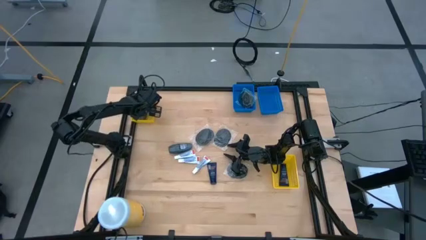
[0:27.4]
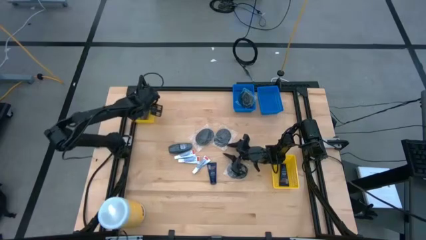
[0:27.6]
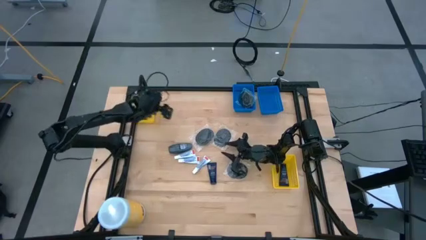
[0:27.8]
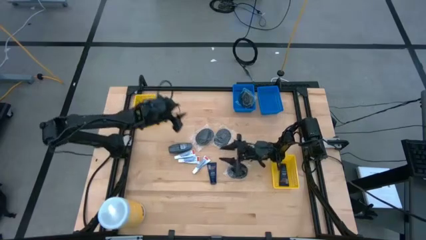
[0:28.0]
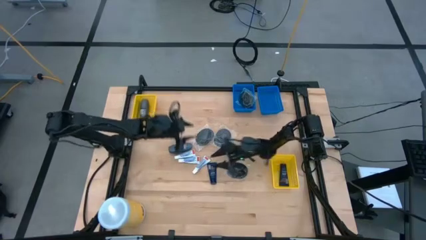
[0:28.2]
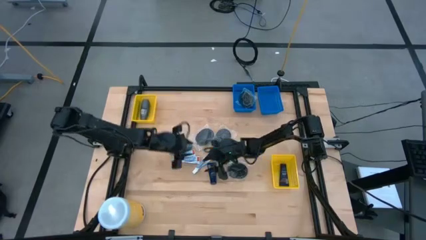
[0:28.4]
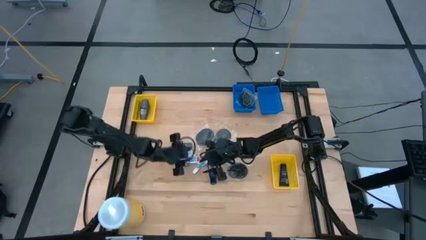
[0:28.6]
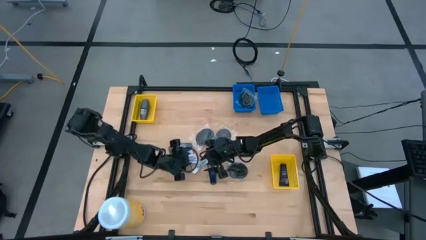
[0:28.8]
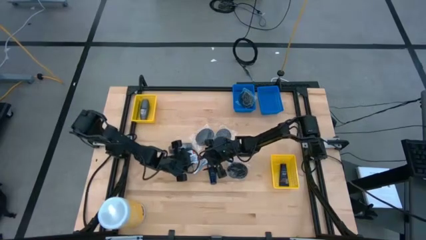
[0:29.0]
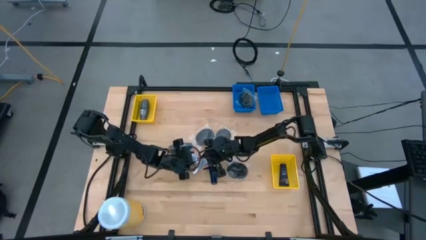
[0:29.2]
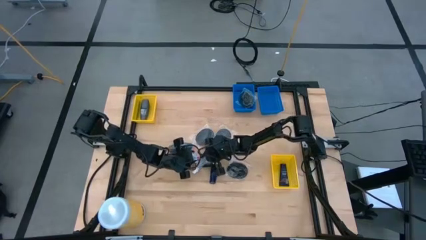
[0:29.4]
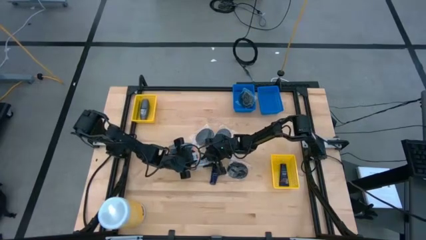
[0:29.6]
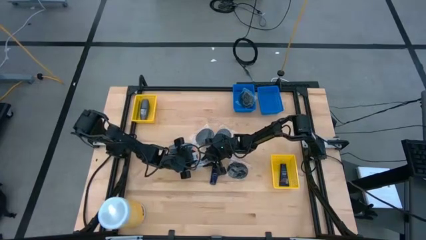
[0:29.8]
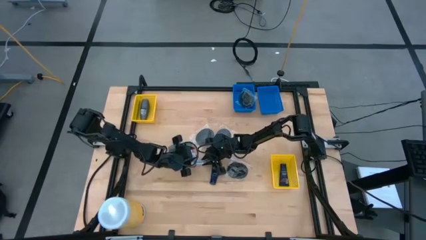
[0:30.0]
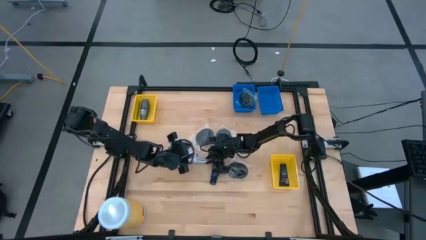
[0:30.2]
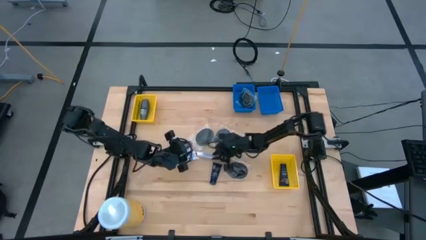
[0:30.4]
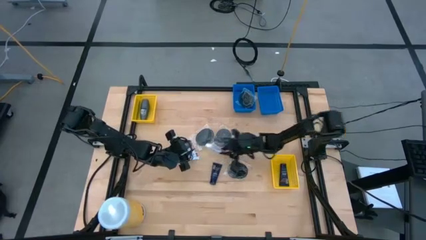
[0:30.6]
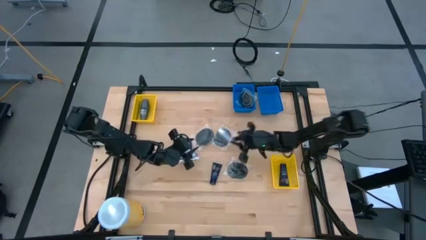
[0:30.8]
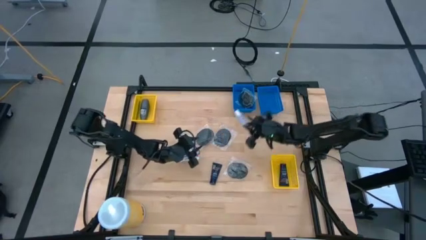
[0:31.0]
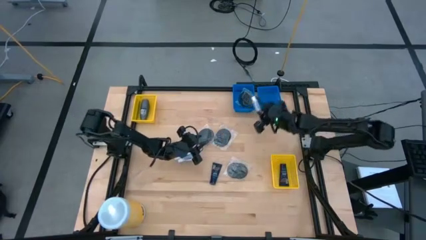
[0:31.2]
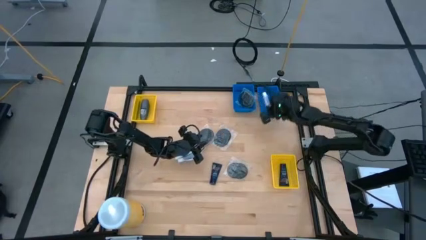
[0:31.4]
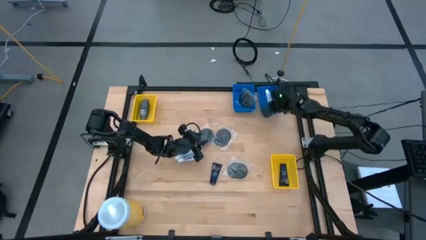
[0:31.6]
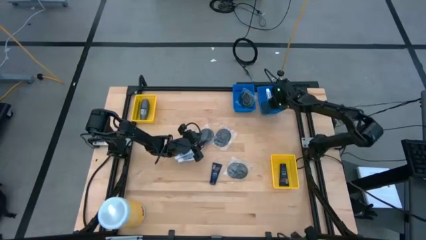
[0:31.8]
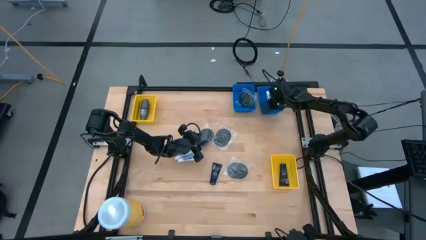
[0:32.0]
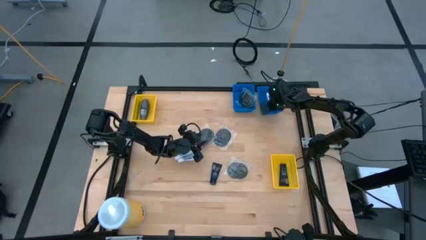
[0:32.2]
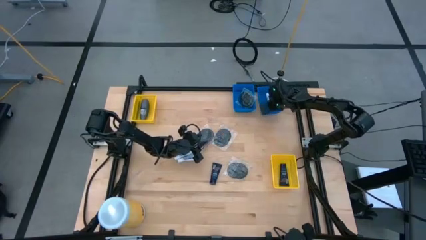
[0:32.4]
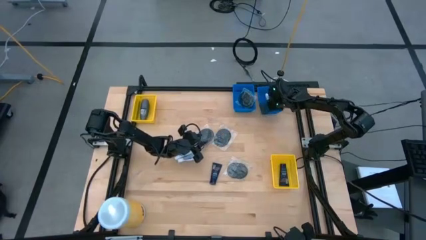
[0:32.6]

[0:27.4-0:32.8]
Task: Pick & Place Travel size toiletries
Put the white toothpaste into the right blue bin

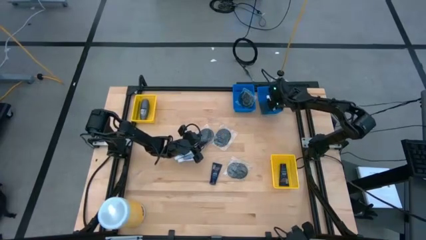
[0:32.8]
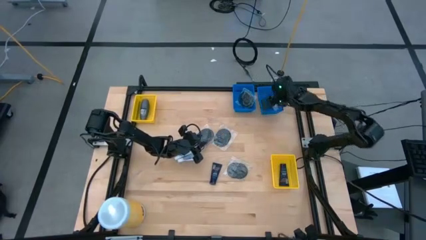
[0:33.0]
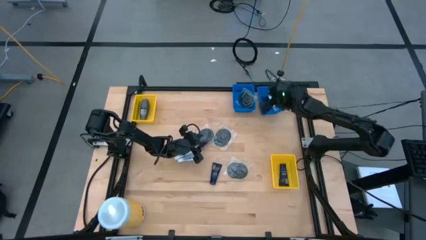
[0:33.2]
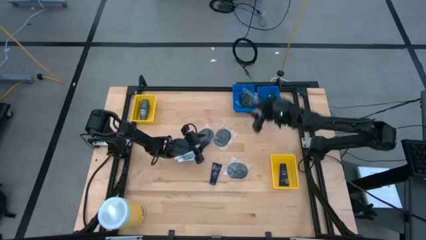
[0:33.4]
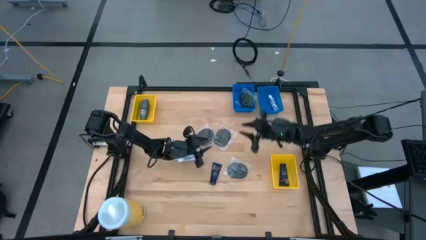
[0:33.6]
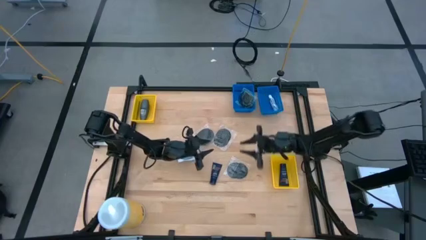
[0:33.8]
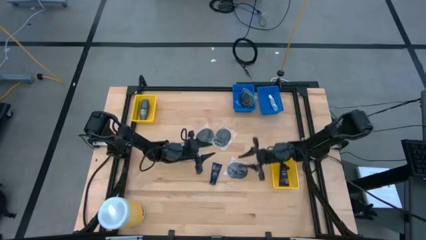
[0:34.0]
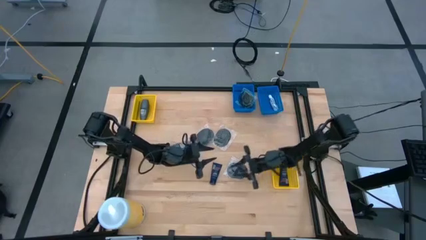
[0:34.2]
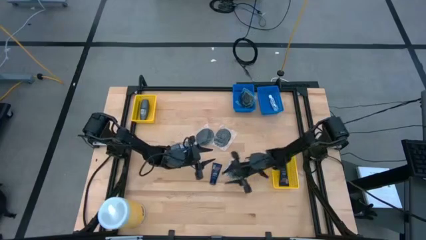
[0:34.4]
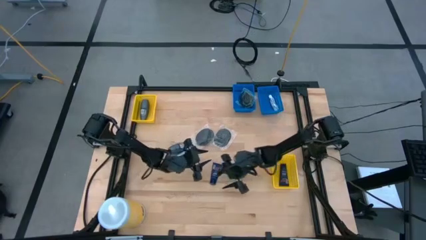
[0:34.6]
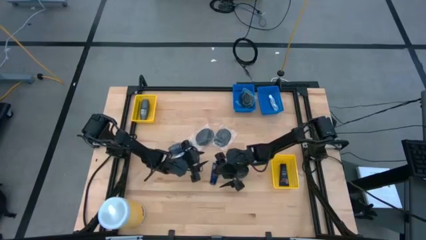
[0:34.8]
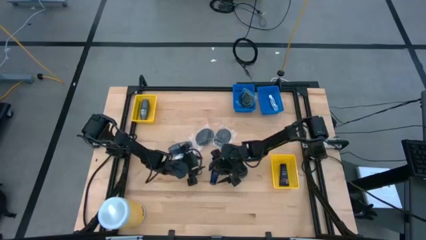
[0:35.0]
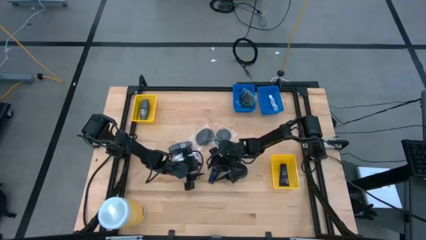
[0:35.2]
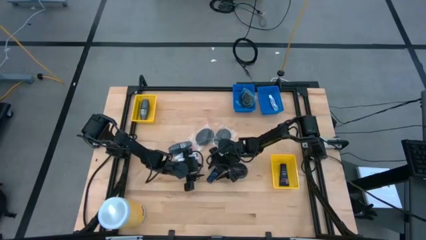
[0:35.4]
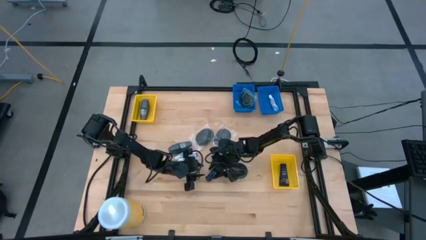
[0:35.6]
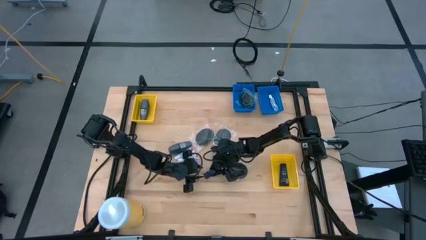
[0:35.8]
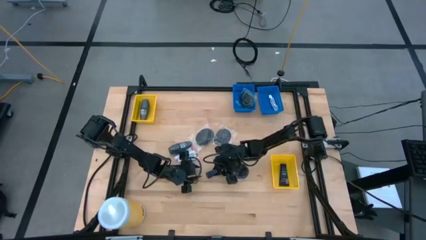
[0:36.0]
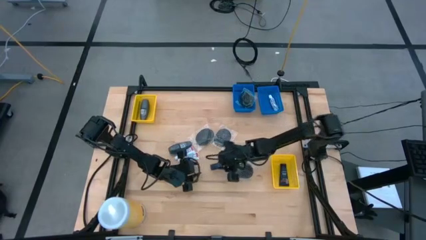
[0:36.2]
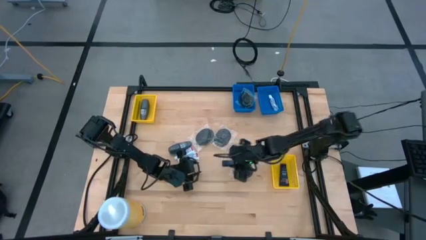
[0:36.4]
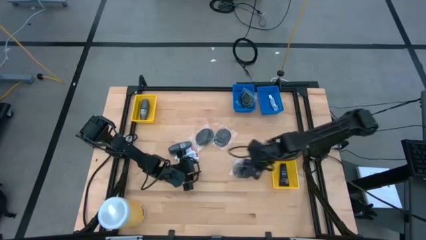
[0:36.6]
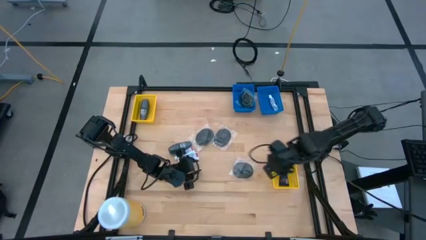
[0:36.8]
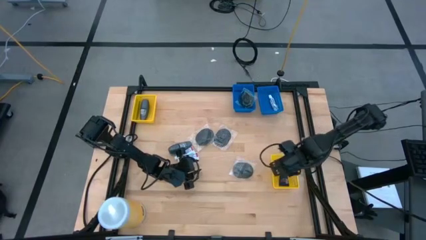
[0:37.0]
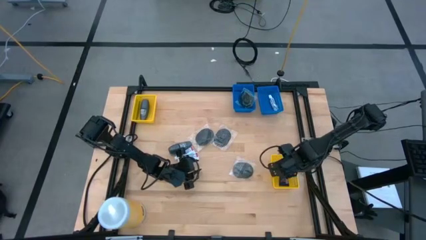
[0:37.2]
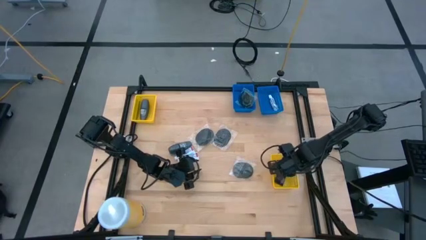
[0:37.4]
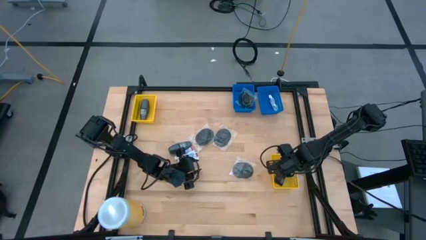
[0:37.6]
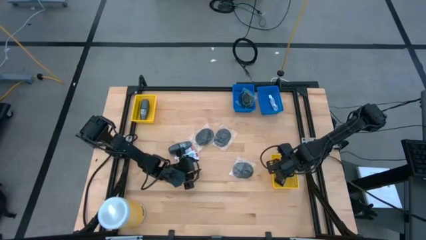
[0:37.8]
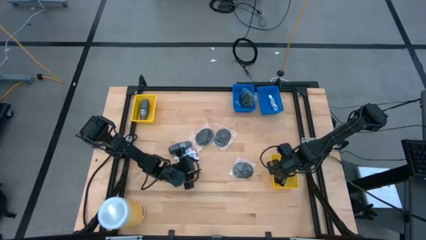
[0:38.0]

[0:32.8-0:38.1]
Put the blue shaver into the right yellow bin

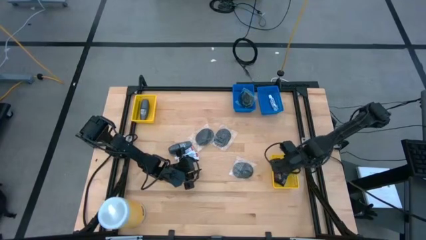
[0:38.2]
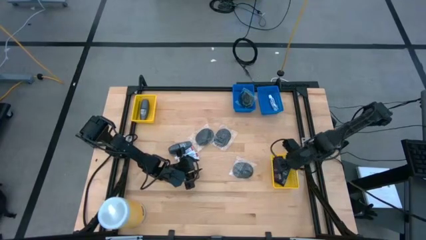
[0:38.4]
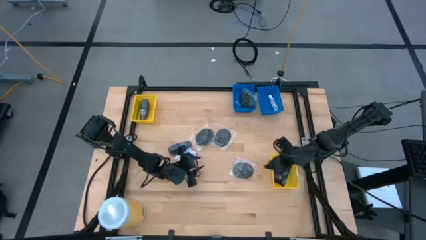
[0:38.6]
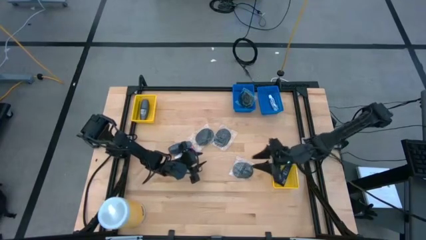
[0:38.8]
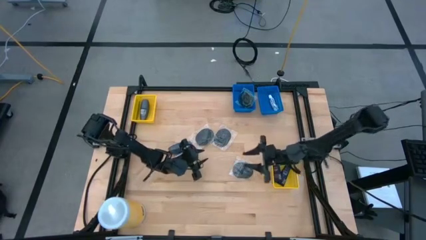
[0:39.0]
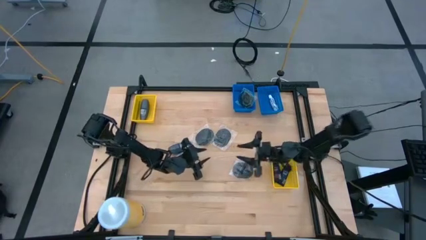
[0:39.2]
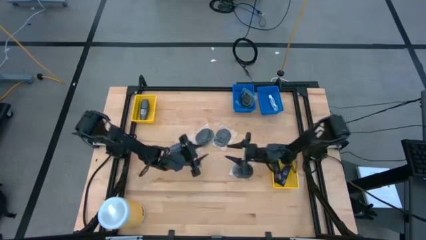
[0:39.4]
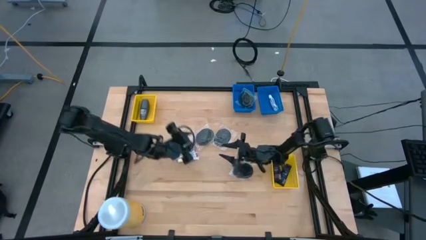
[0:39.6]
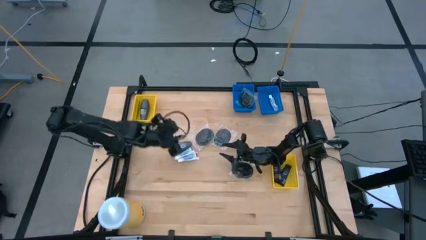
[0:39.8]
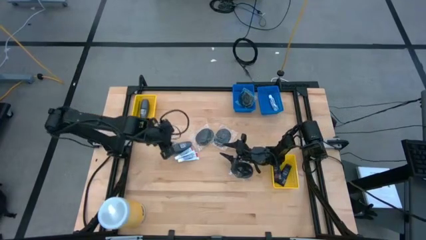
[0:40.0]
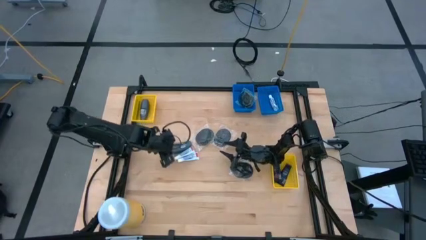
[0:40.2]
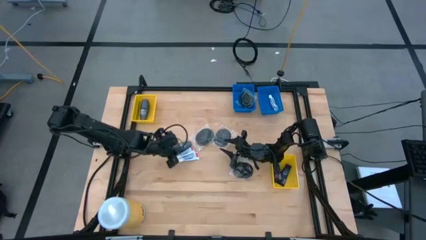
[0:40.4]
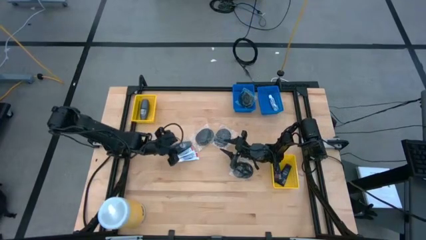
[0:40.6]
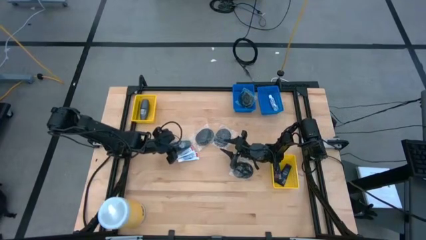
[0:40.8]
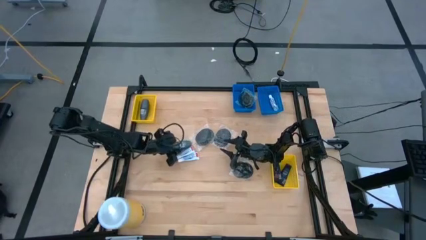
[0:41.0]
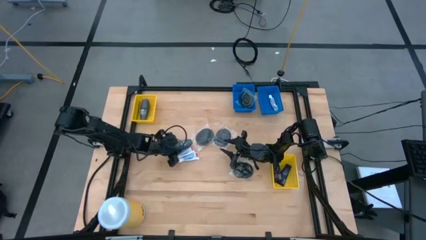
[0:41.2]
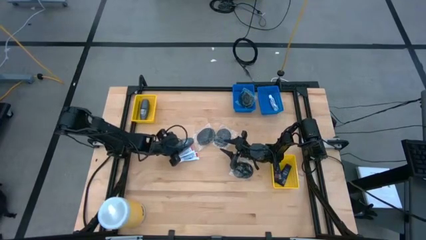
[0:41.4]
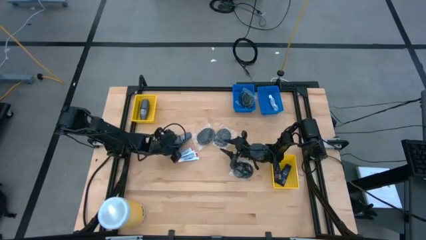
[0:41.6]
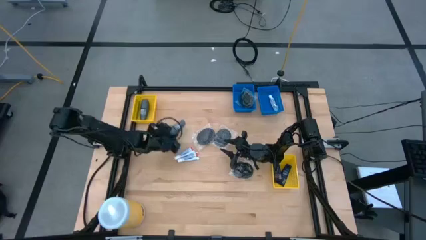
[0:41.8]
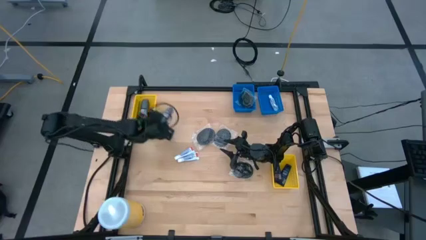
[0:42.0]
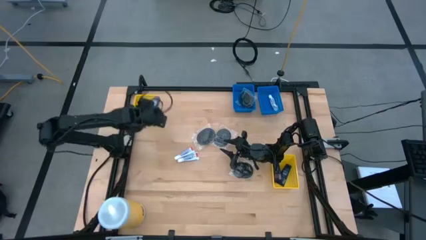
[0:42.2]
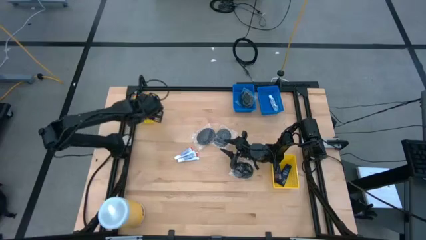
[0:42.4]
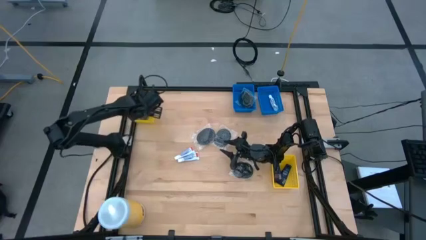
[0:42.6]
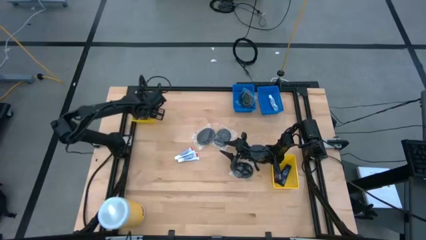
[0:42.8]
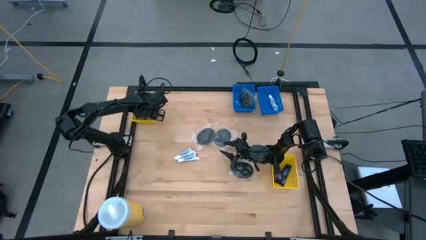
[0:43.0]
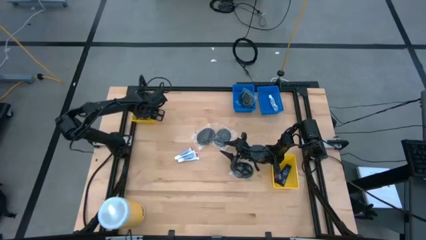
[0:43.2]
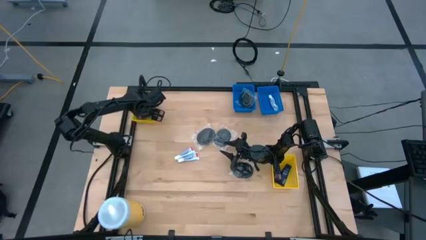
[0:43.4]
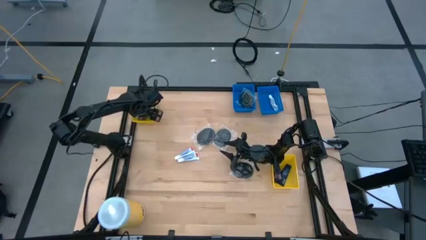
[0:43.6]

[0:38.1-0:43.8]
Put the black roll-on deodorant into the left bin
